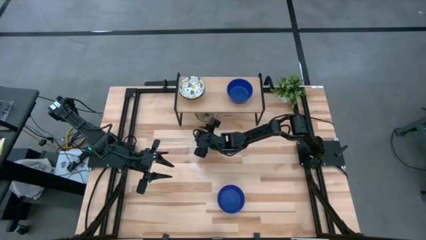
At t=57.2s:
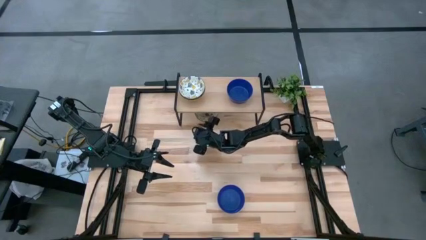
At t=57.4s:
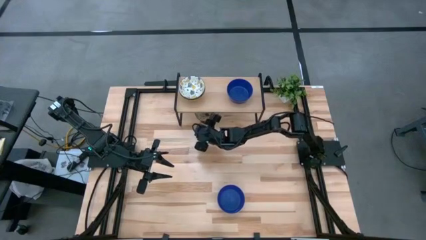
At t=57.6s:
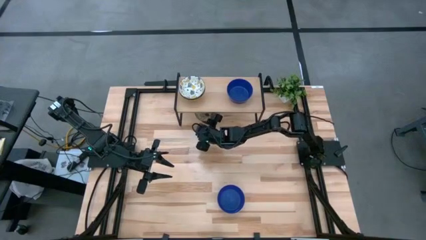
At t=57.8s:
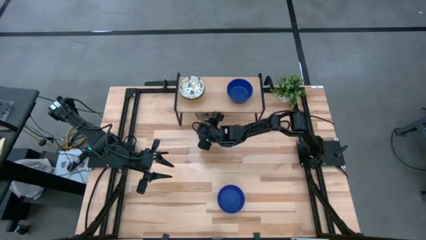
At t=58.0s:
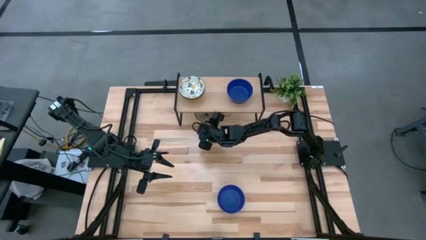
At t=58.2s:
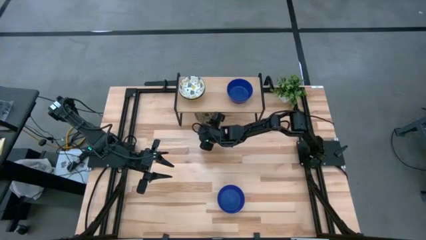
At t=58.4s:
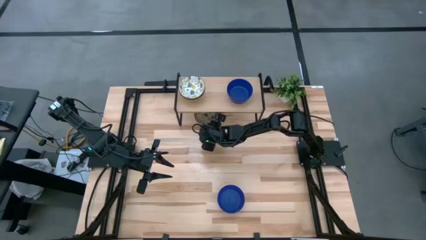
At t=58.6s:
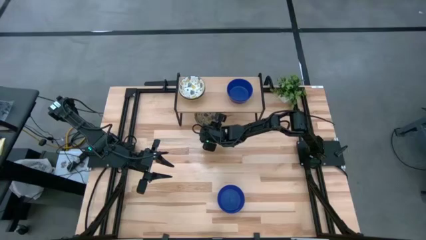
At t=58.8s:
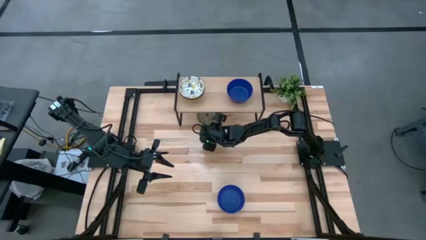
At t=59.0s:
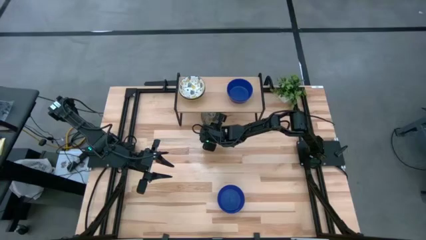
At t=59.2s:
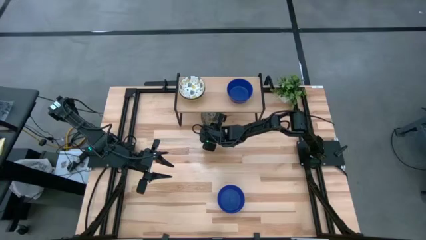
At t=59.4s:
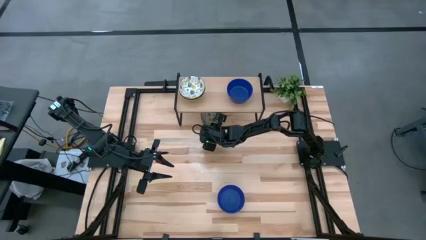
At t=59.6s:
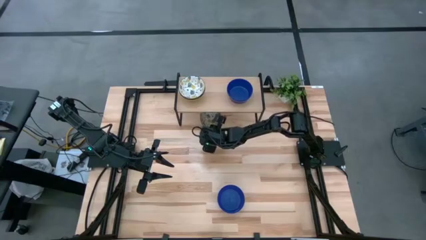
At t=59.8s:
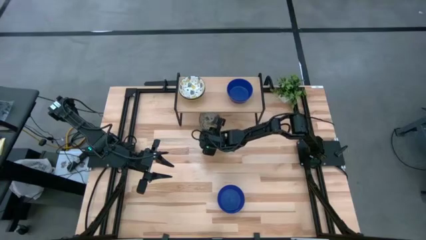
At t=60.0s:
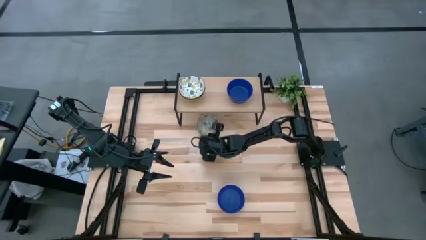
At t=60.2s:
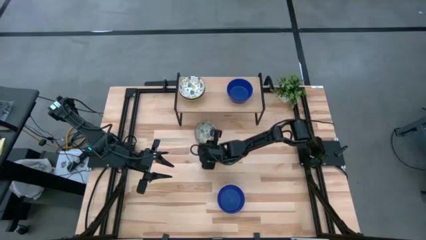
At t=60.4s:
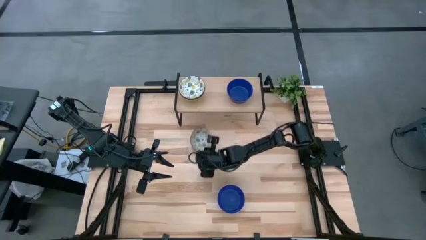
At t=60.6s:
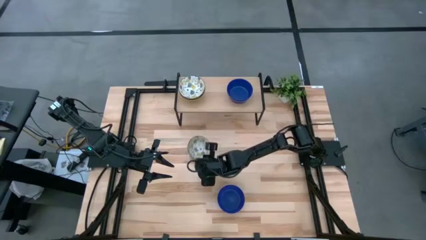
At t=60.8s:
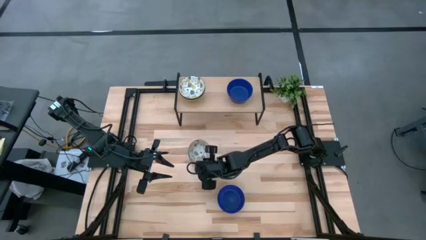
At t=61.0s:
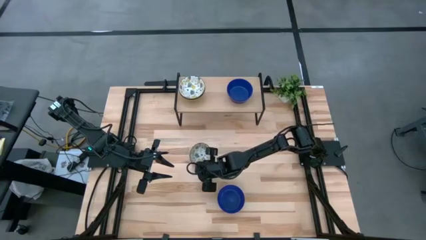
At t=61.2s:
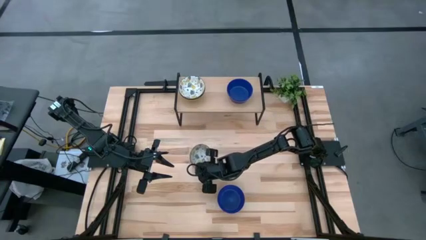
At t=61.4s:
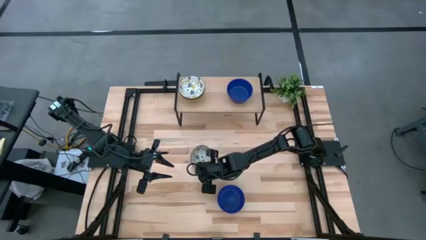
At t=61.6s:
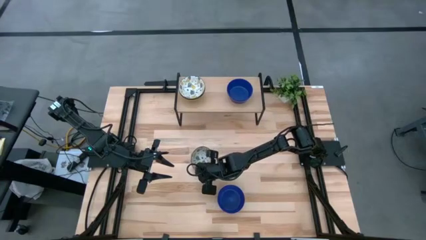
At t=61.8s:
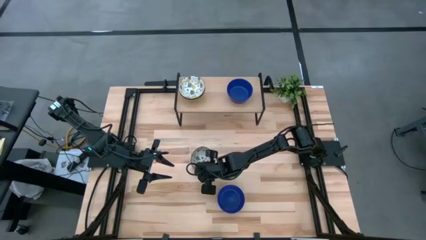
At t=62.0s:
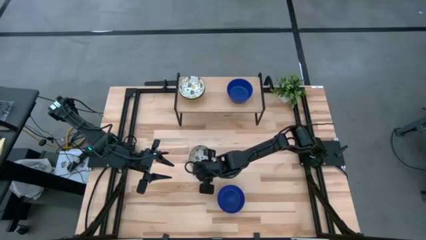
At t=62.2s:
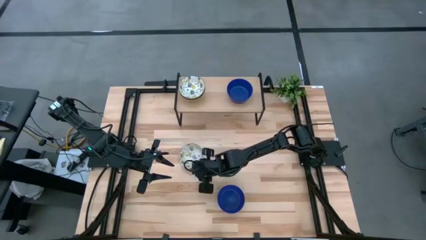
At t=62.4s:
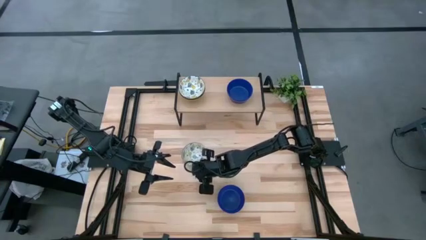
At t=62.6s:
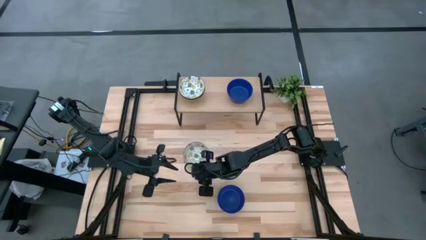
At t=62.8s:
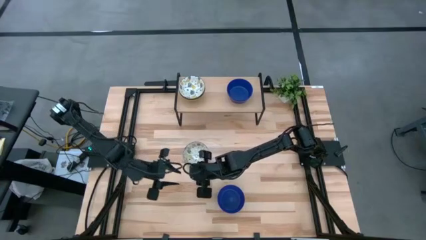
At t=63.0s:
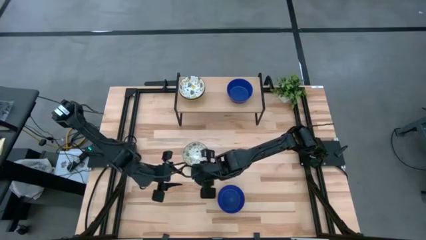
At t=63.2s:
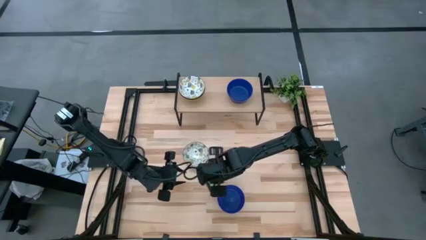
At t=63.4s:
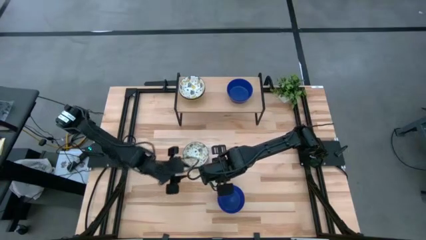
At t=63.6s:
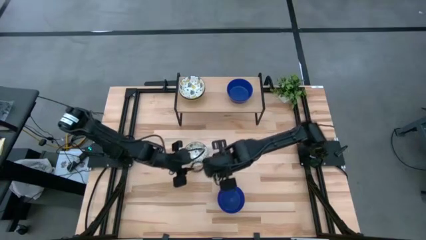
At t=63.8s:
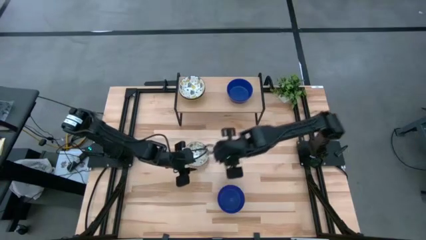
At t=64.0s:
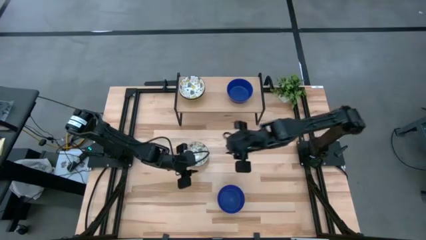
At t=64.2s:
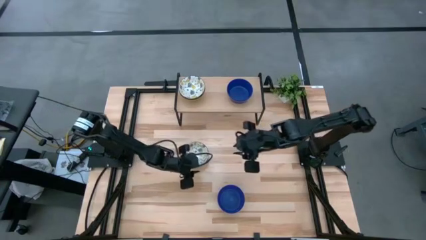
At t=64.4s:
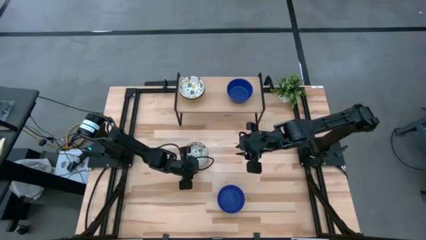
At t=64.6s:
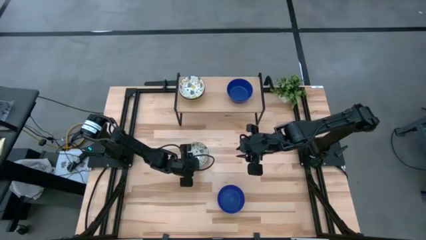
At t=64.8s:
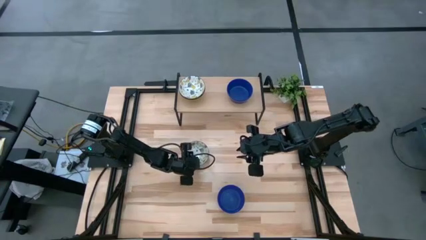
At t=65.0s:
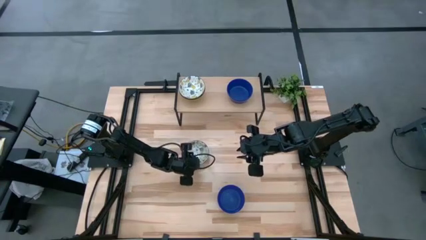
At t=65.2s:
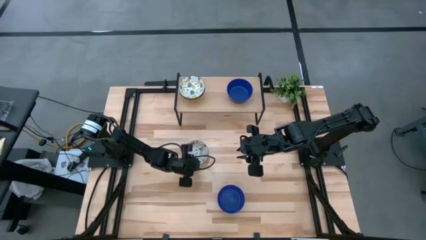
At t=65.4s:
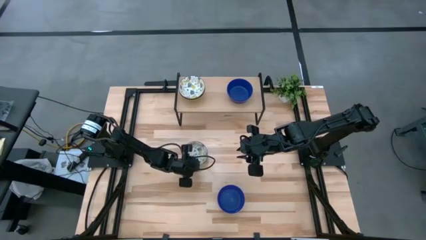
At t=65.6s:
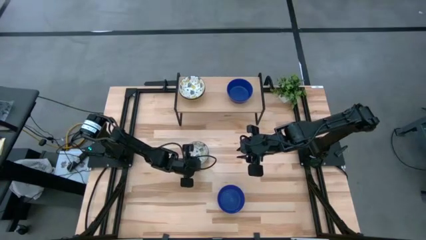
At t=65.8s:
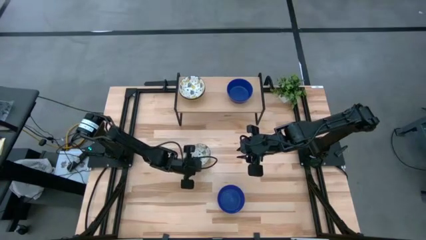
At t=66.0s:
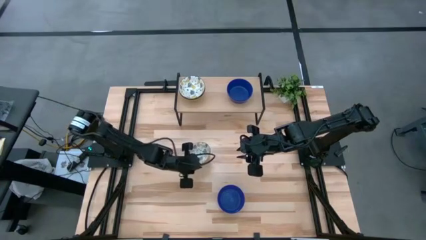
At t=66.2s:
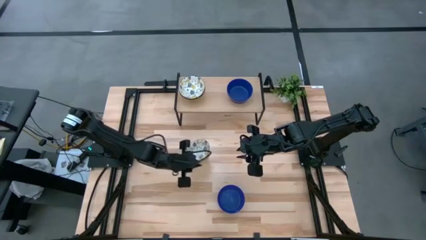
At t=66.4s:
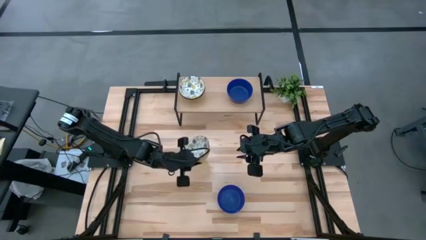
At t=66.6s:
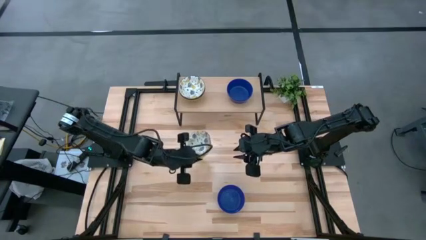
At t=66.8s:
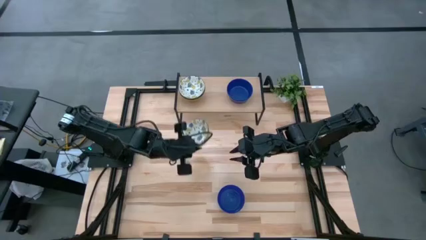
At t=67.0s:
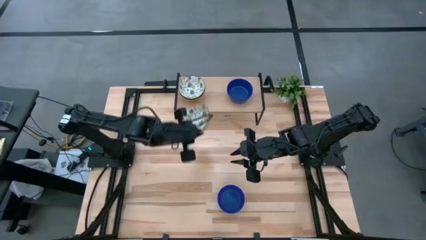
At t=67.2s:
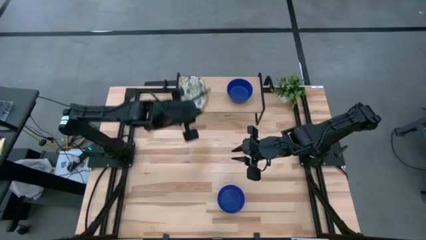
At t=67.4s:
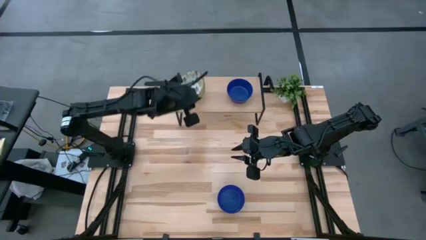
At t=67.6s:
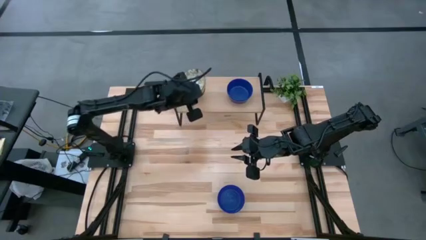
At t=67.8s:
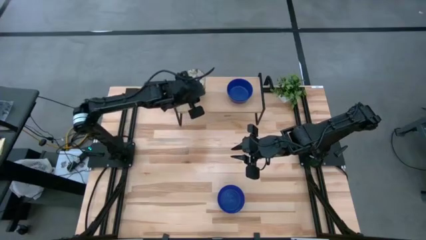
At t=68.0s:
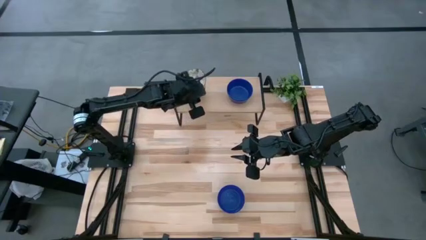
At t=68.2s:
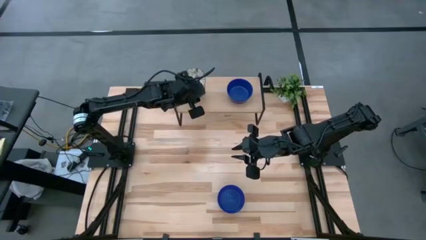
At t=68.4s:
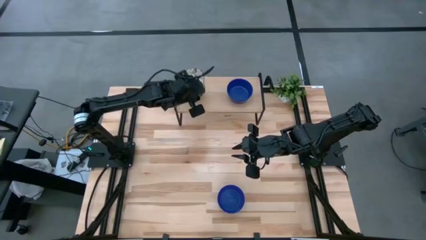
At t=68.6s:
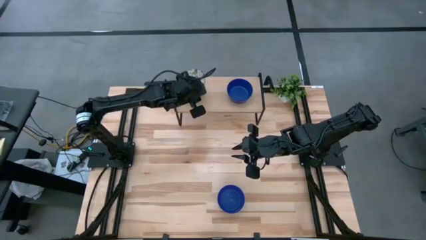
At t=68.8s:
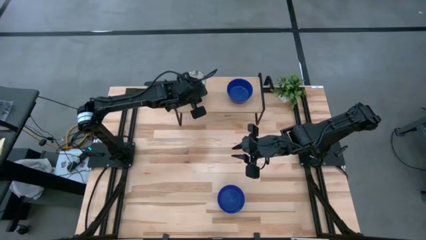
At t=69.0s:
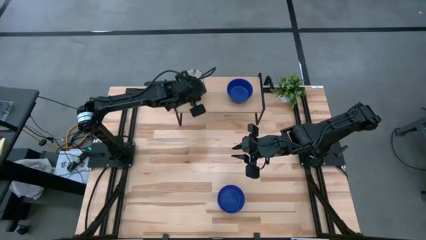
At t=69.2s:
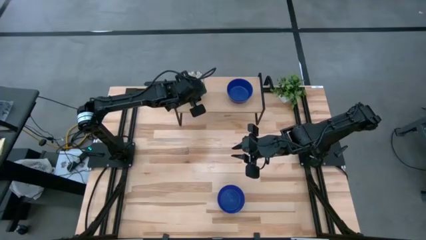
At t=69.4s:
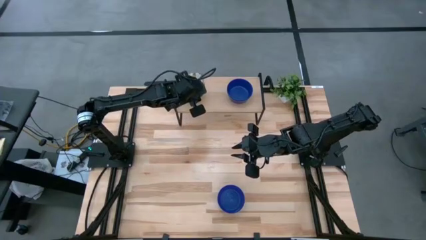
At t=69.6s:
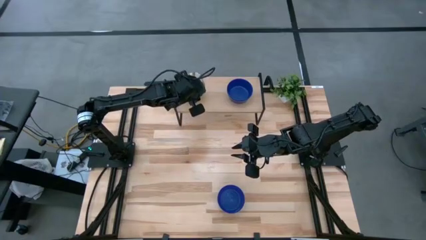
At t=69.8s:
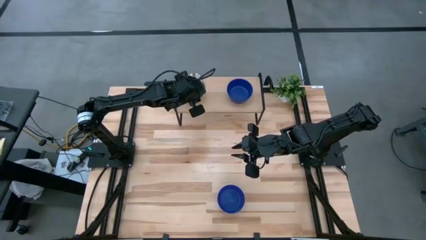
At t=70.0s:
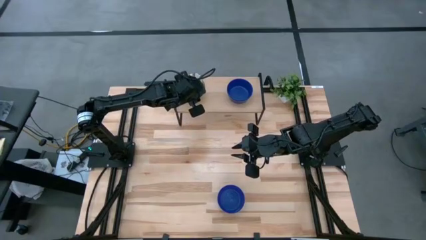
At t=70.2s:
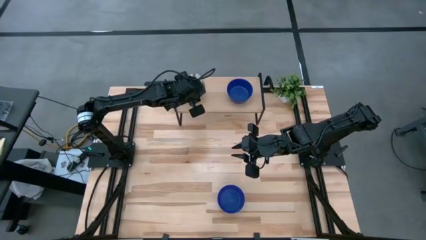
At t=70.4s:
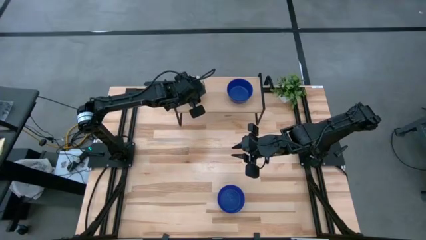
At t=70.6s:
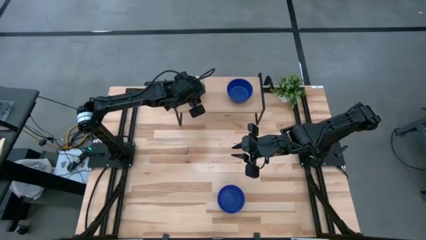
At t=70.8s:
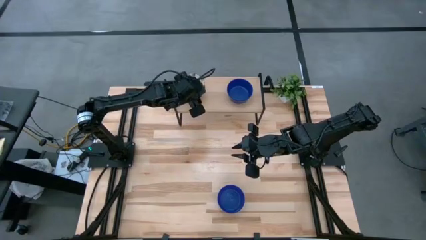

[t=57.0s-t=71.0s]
Task: Pick & Place Mini bowls
Stack the white bowl on top of the white bowl on the shelf

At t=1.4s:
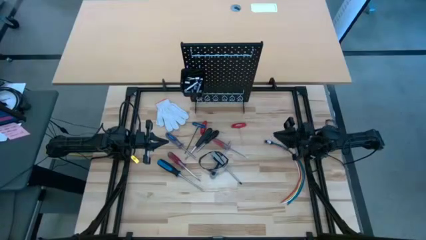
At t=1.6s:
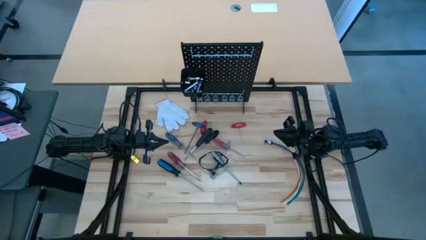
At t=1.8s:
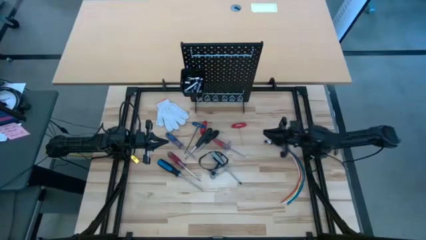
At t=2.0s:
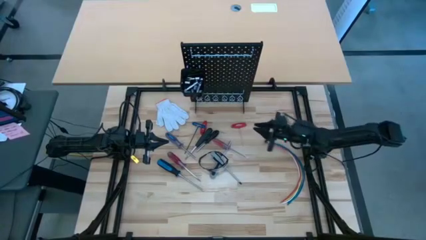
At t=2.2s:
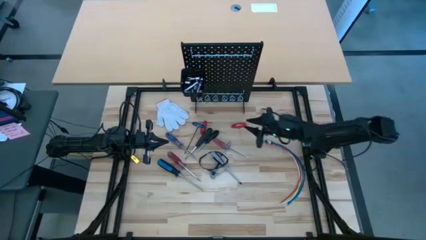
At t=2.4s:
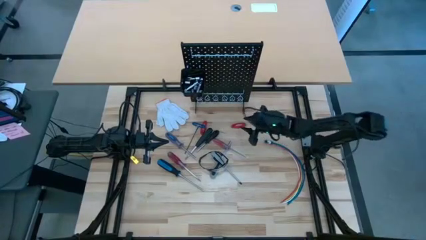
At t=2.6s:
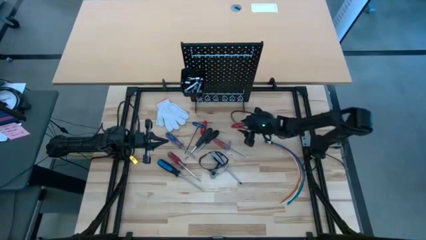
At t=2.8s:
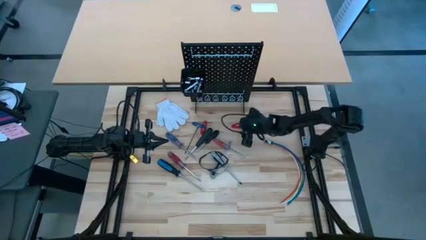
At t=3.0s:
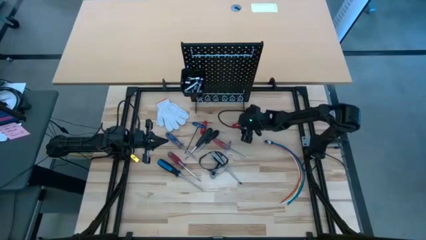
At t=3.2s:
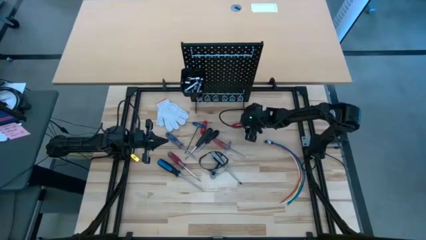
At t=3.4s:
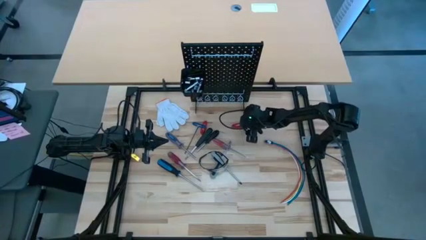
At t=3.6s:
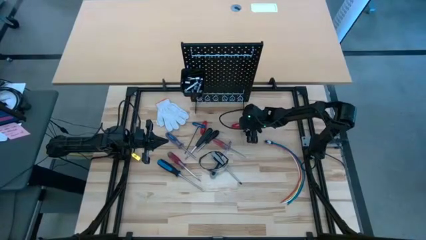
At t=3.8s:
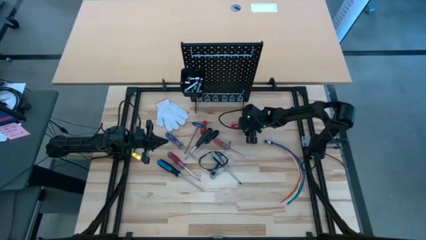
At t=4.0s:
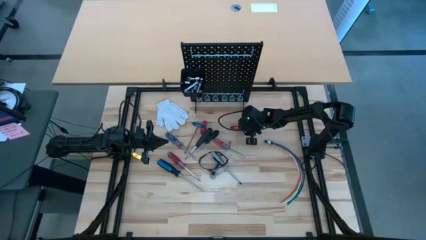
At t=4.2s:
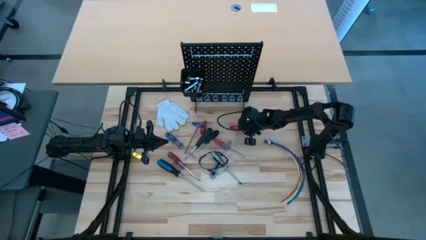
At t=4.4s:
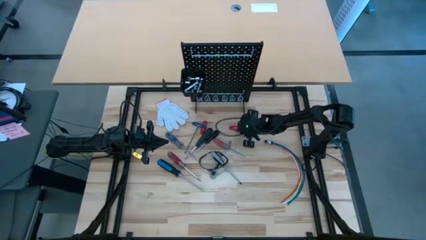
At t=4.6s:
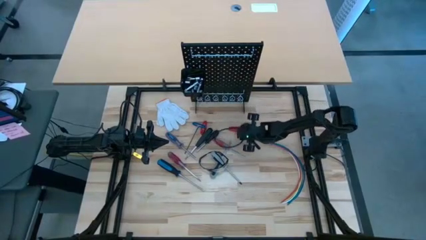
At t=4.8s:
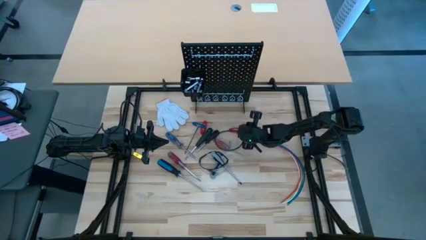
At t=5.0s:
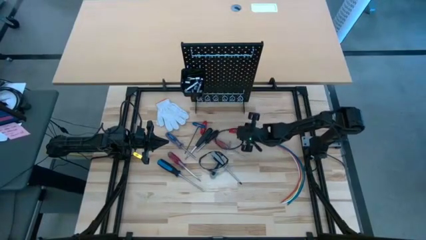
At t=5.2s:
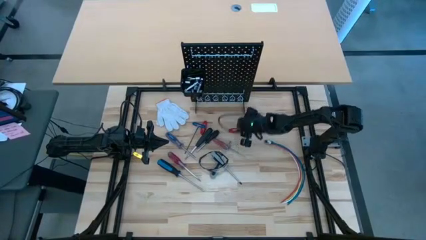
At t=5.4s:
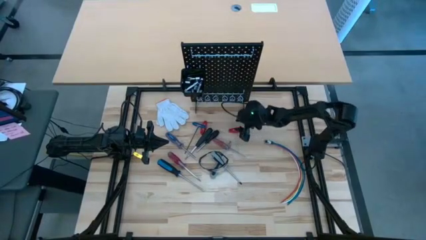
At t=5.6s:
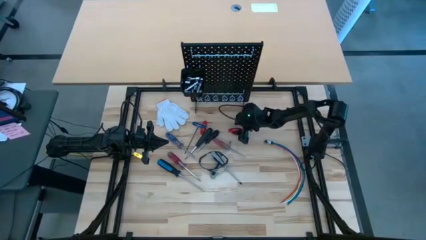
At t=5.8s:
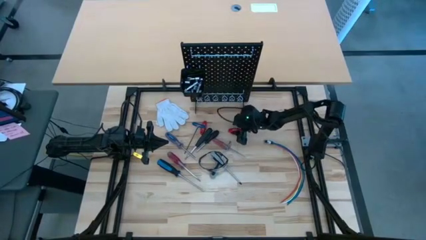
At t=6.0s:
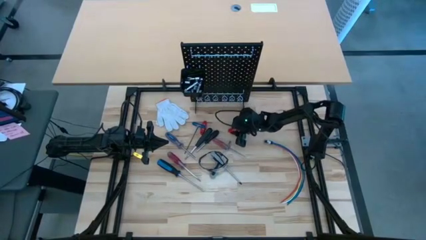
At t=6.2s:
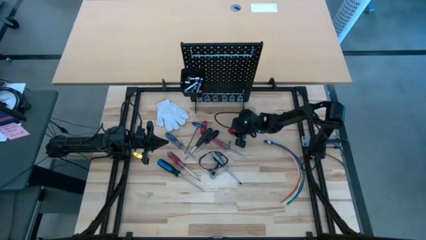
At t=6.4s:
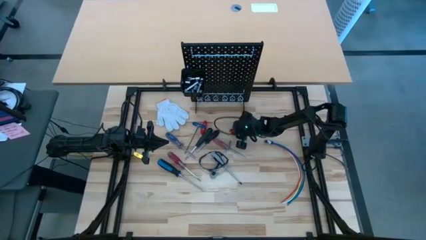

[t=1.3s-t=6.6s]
Task: Hang tools onto peg board
Hang the right red allen wrench on the peg board
